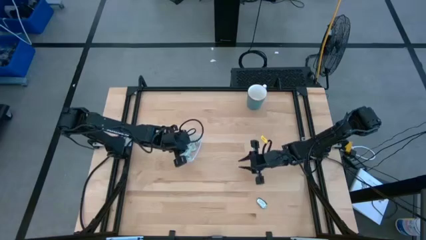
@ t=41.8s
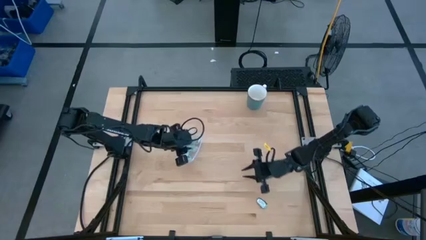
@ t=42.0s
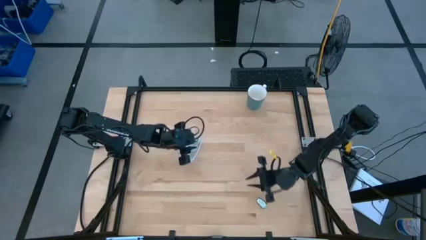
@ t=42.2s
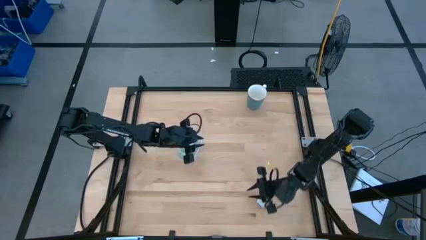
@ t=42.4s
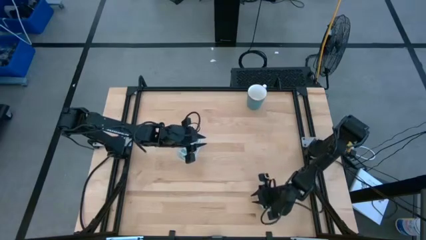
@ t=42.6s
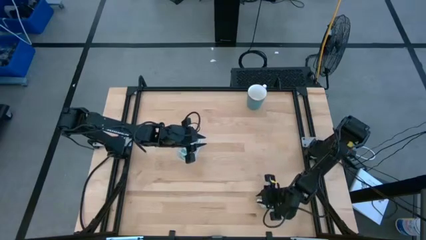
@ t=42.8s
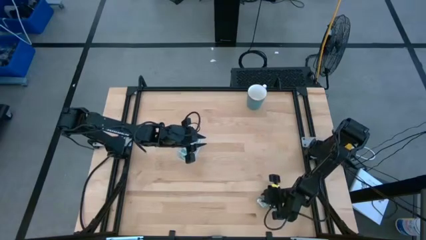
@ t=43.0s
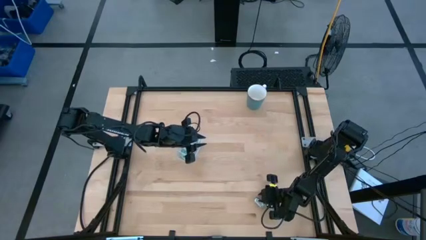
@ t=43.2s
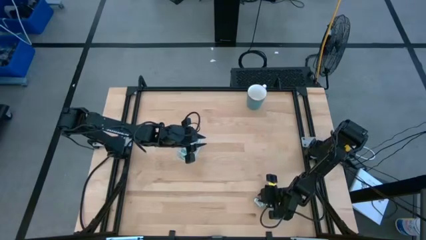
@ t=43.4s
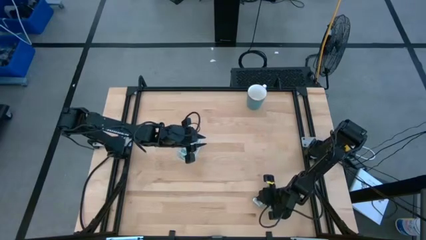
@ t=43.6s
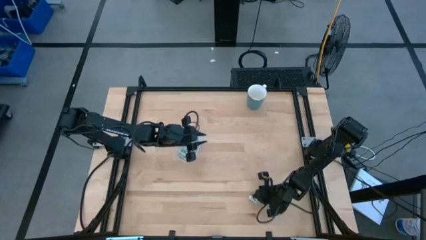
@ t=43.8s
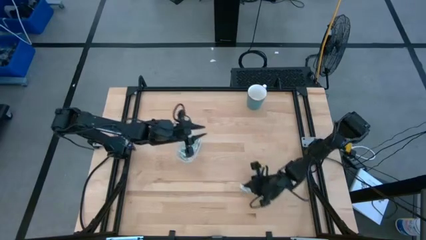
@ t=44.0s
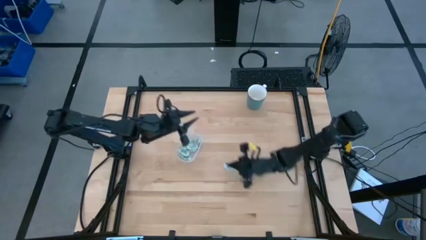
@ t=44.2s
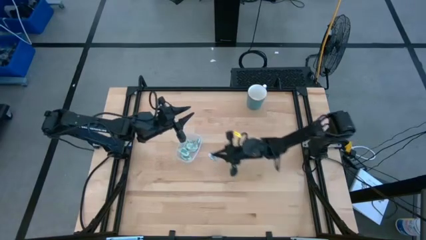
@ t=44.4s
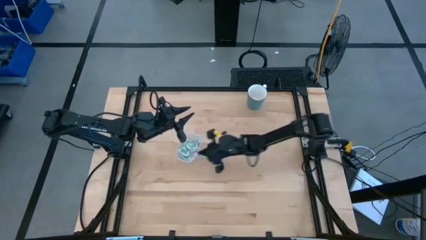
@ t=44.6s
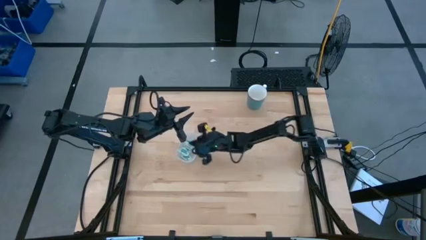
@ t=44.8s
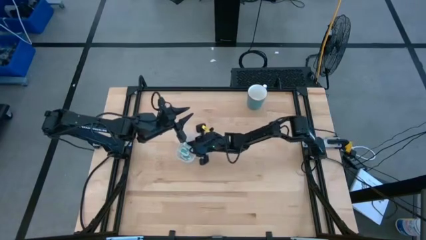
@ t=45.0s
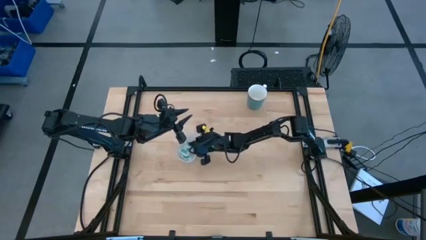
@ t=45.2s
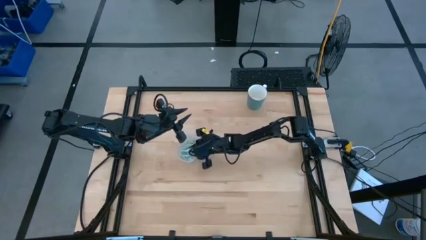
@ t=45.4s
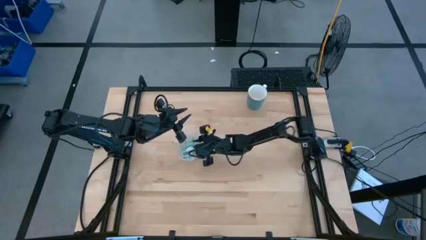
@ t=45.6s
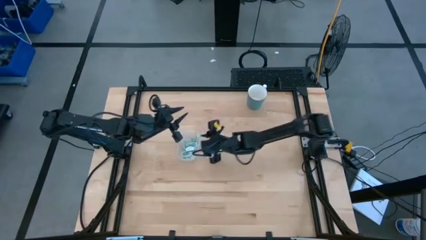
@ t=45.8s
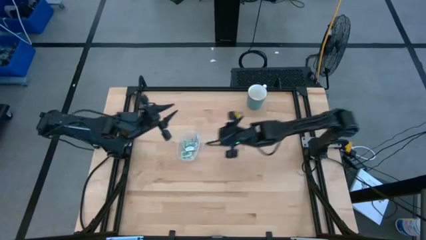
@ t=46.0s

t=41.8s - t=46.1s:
Task: Pick and place Stevia / Truvia into bins
Put the green truvia packet into the transparent bin

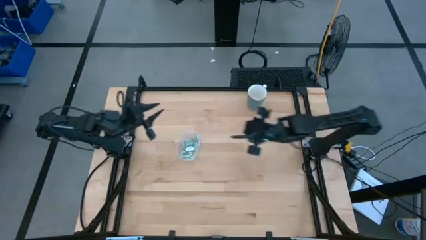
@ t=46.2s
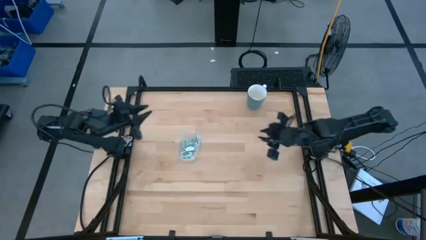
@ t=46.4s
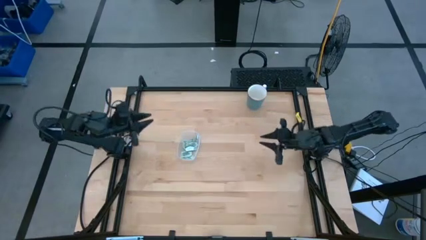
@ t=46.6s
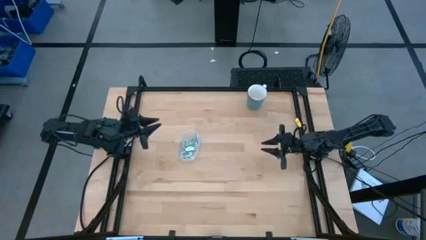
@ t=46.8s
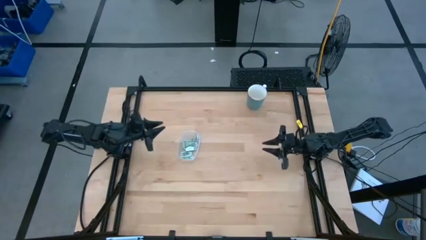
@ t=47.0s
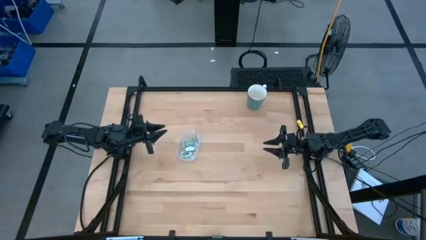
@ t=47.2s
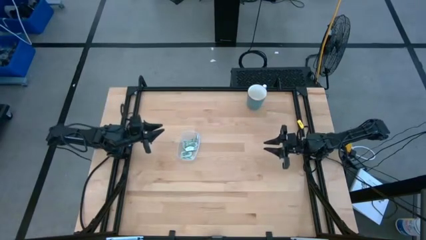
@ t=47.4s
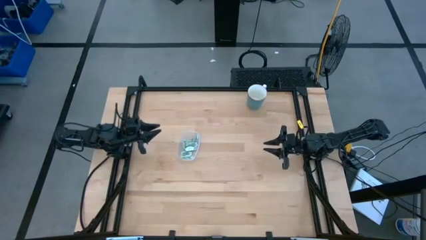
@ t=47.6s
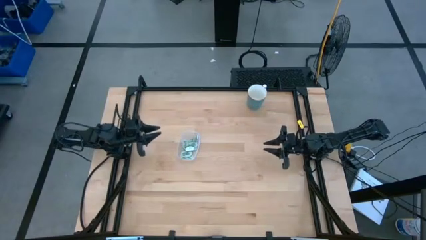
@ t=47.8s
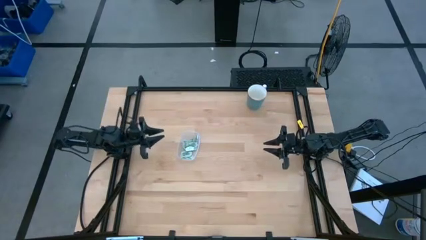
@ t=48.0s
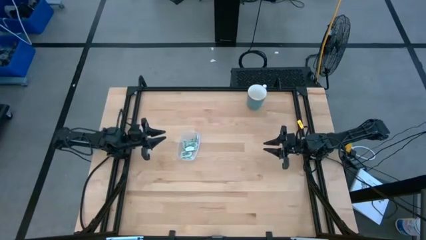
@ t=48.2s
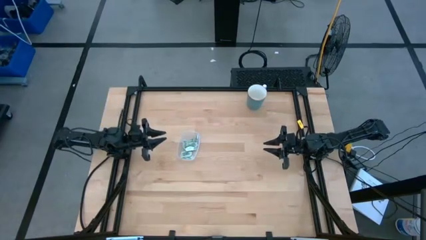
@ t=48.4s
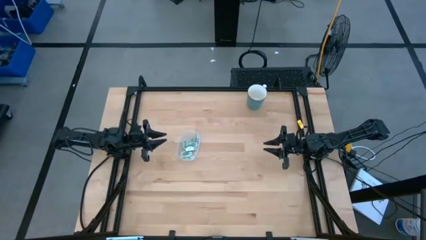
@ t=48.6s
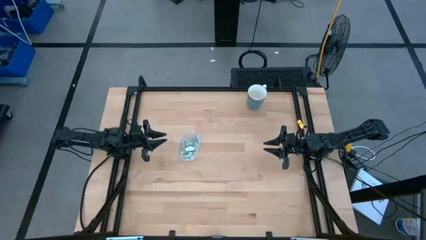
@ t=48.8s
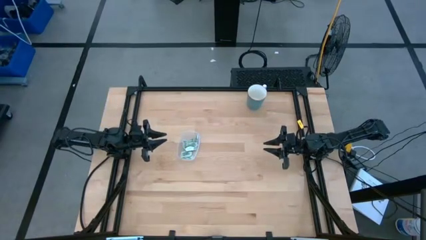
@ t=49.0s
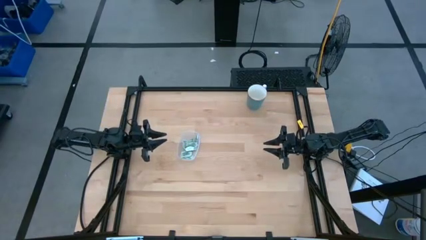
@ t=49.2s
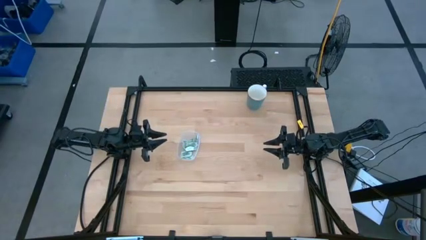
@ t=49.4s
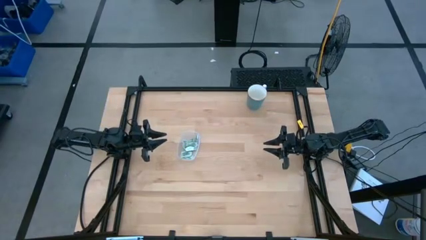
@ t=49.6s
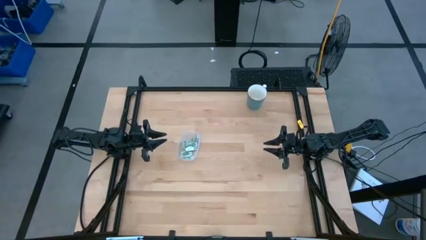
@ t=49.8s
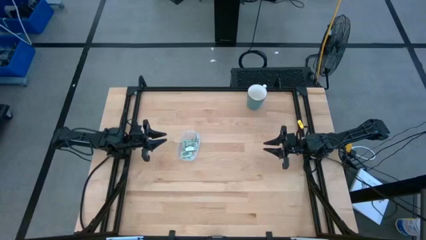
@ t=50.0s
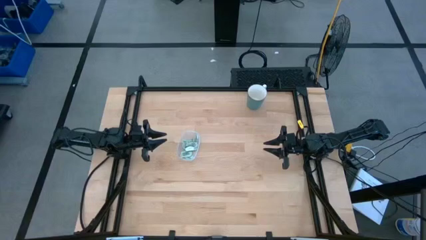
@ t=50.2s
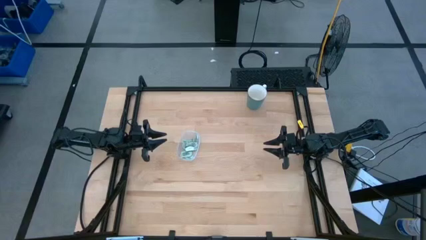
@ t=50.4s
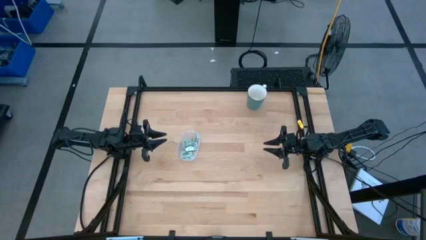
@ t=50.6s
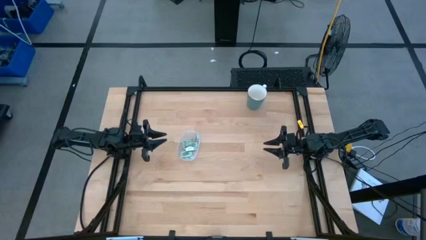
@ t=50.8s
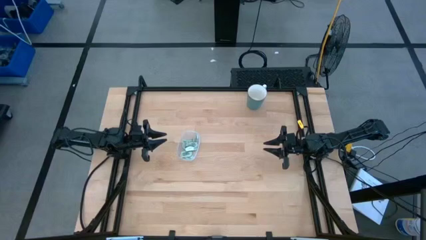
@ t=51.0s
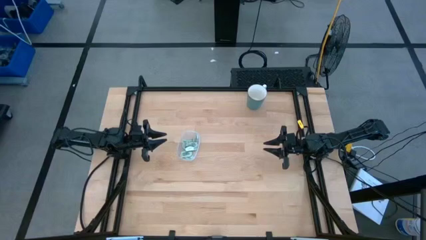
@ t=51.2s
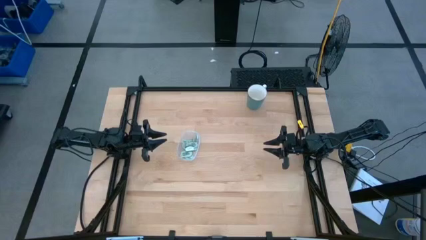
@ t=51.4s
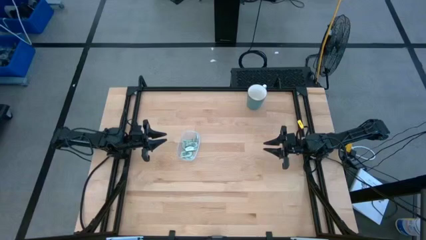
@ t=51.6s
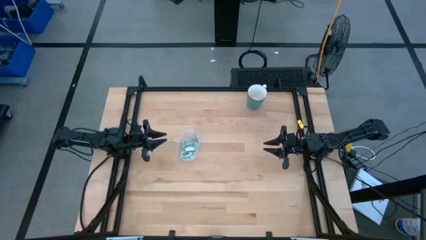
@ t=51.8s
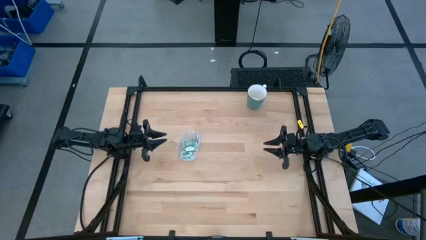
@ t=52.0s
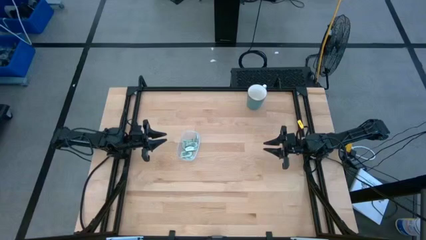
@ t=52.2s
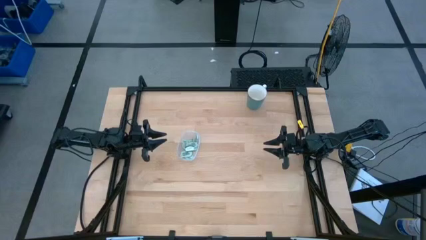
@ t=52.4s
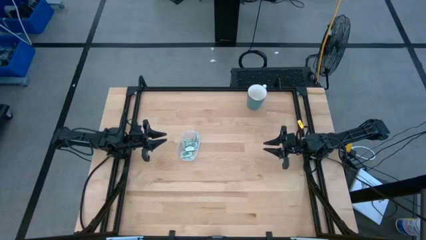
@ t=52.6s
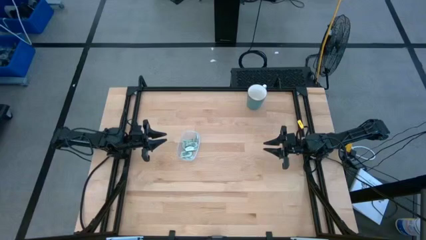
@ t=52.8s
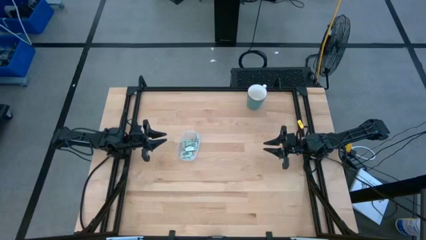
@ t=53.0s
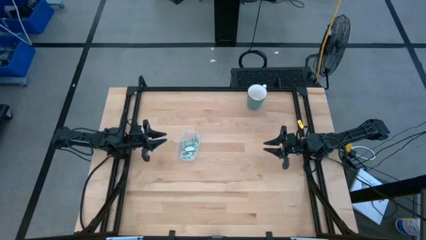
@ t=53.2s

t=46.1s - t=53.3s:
Return to Home Position

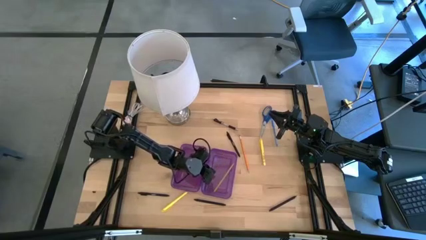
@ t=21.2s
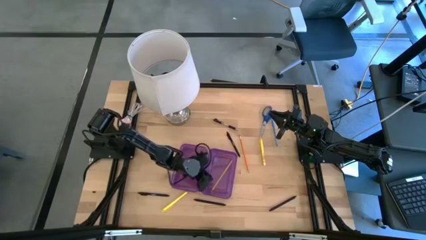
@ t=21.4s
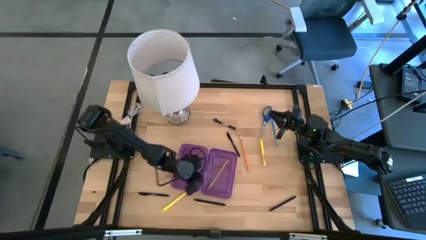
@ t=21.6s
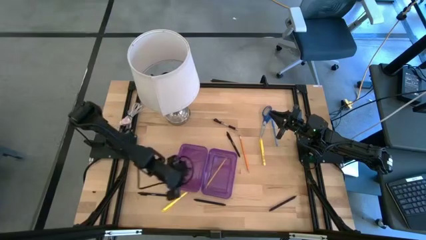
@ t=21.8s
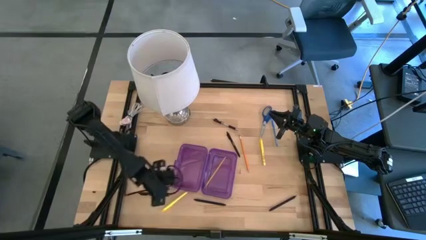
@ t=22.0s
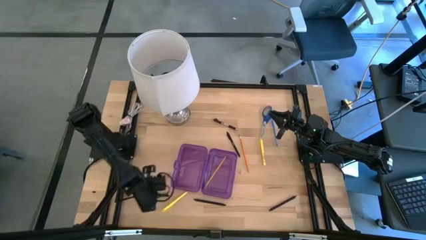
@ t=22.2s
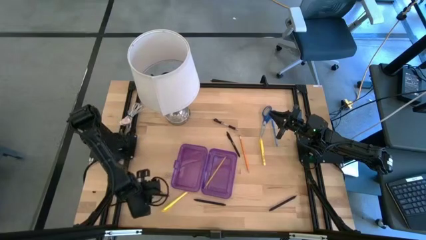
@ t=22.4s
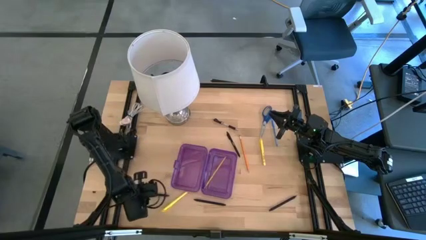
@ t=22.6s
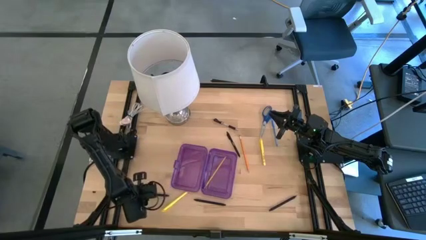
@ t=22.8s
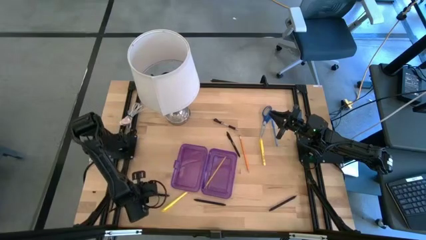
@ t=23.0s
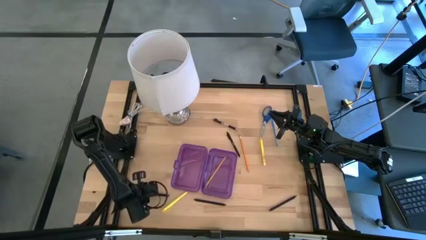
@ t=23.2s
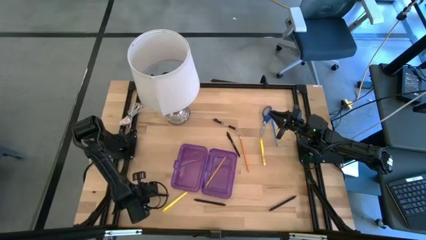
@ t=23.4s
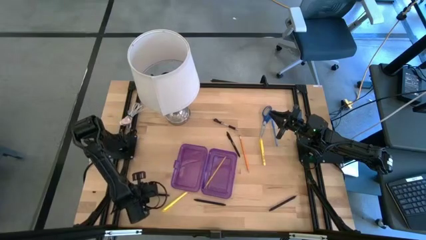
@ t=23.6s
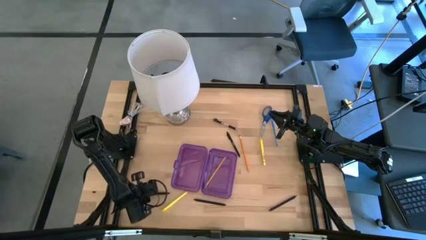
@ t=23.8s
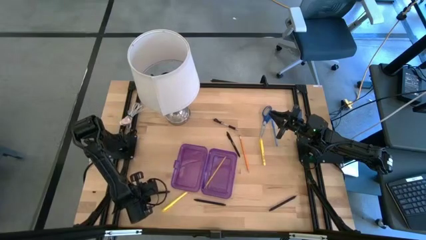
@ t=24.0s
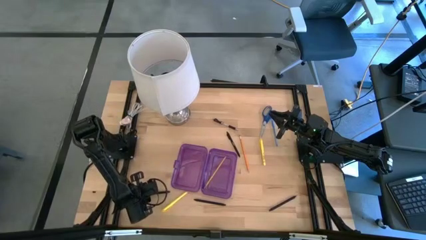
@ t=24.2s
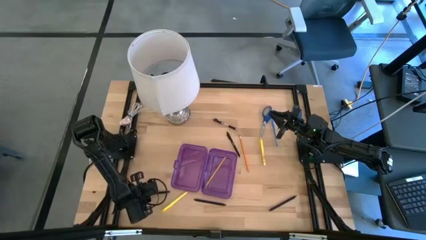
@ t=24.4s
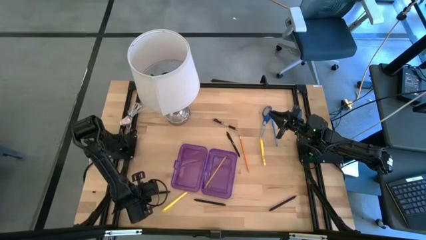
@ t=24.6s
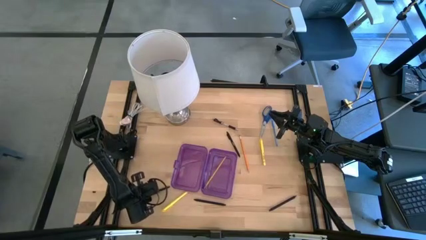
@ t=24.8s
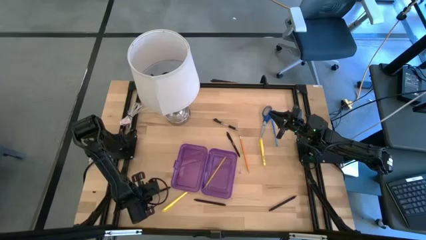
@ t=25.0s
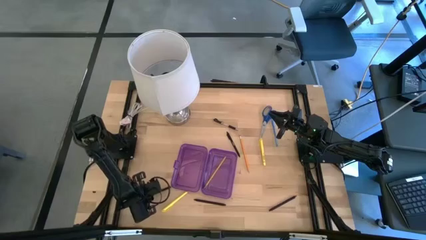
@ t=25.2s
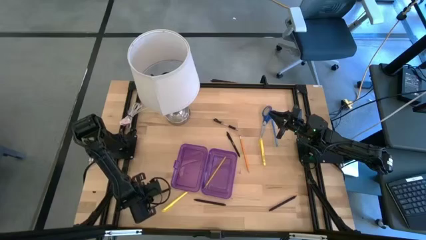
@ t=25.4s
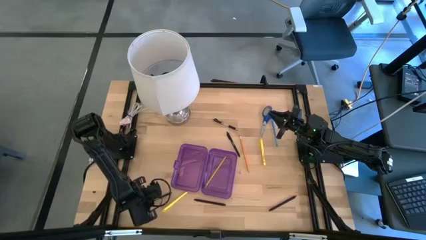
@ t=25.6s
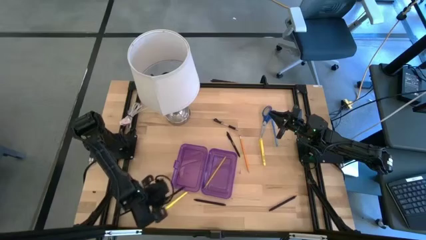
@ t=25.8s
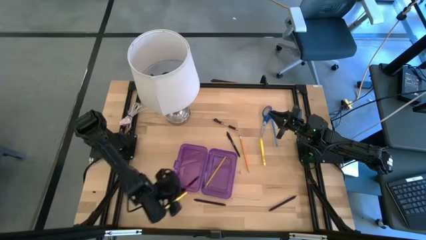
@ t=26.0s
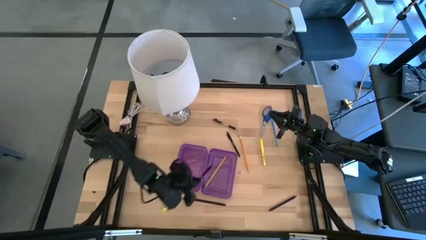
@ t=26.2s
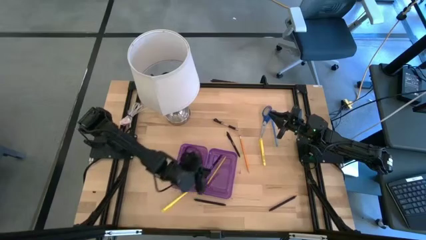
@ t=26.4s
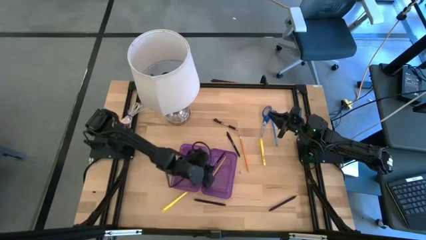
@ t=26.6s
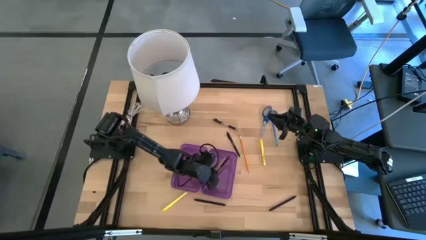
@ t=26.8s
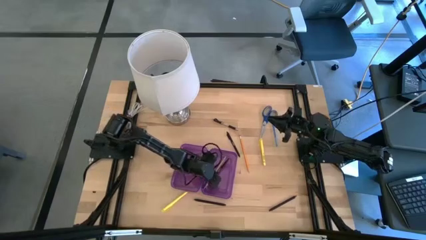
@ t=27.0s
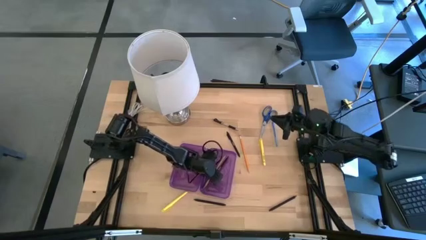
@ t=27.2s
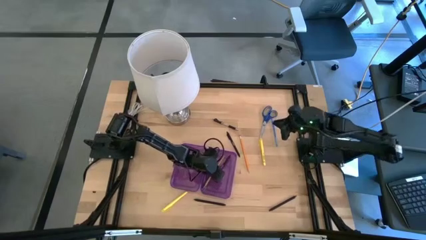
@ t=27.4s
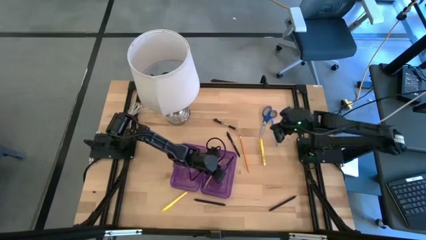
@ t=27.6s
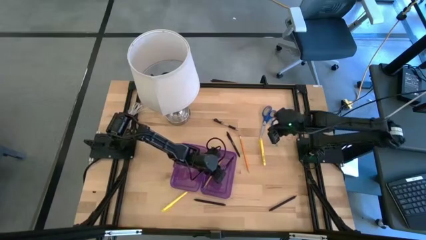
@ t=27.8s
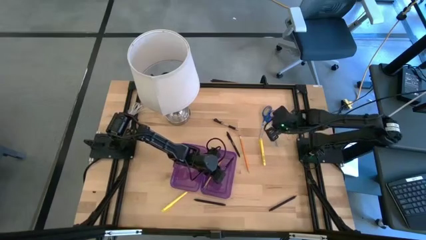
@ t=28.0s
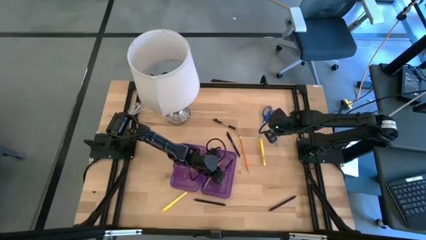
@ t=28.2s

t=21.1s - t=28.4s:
Task: Pick & place school supplies into a supply box
Put the black pen into the purple supply box
